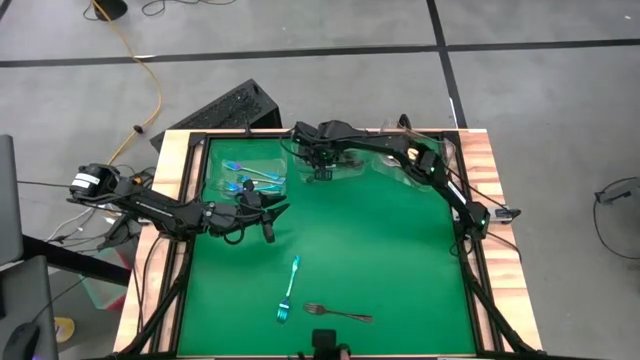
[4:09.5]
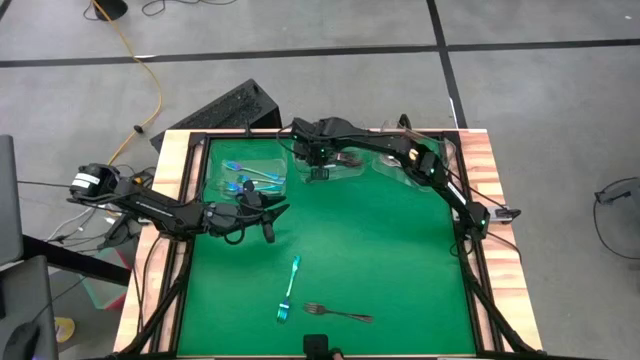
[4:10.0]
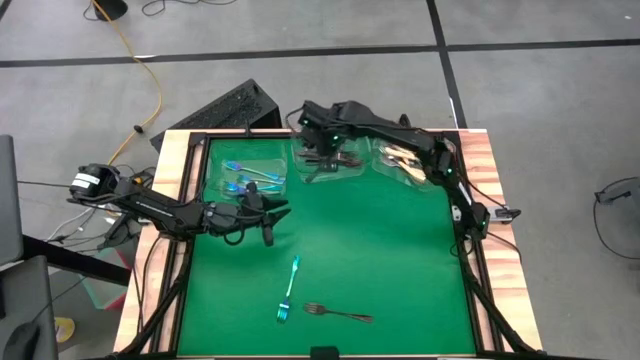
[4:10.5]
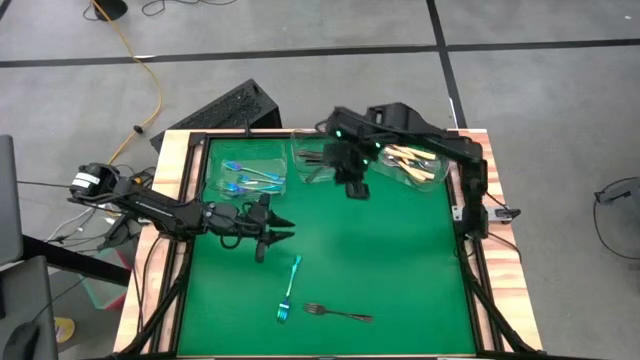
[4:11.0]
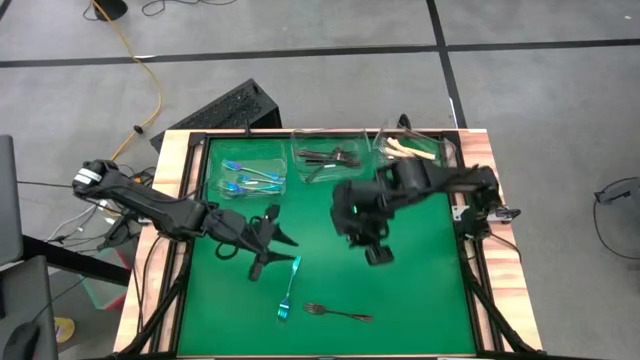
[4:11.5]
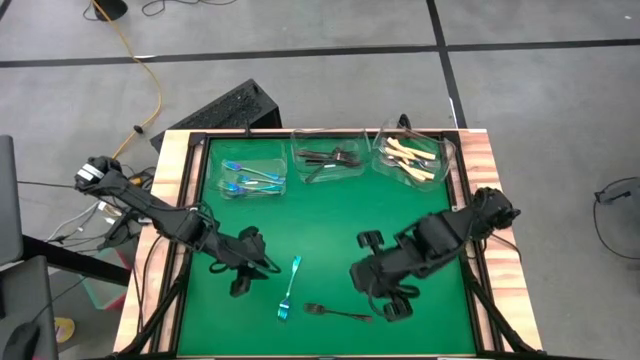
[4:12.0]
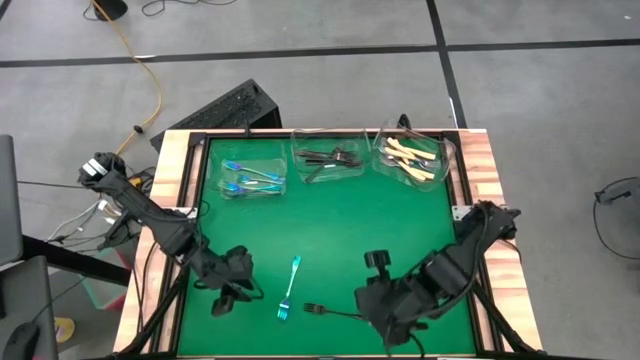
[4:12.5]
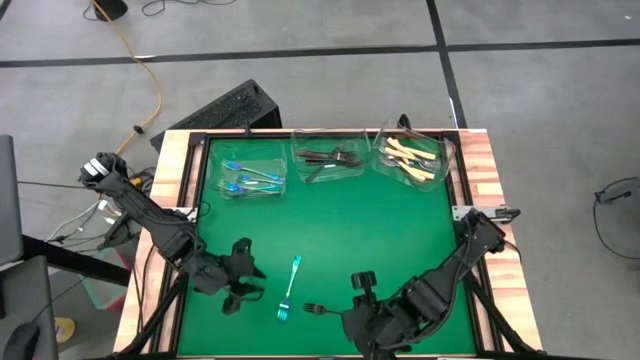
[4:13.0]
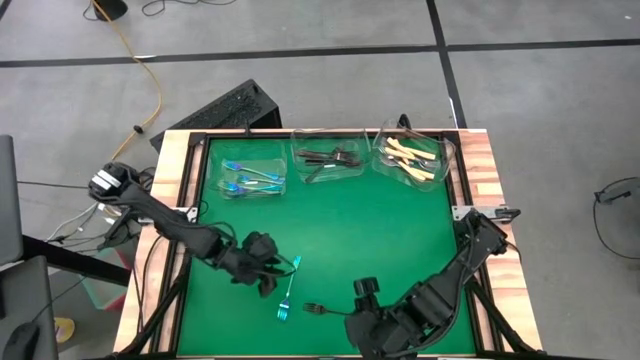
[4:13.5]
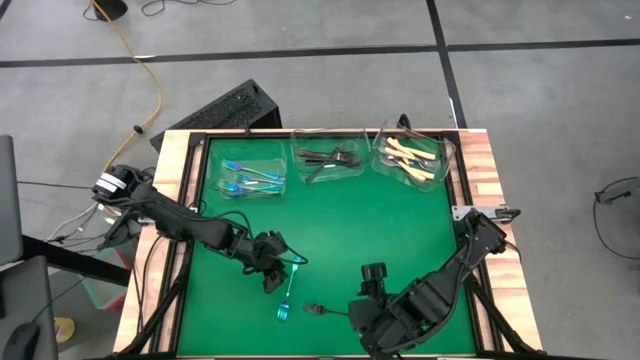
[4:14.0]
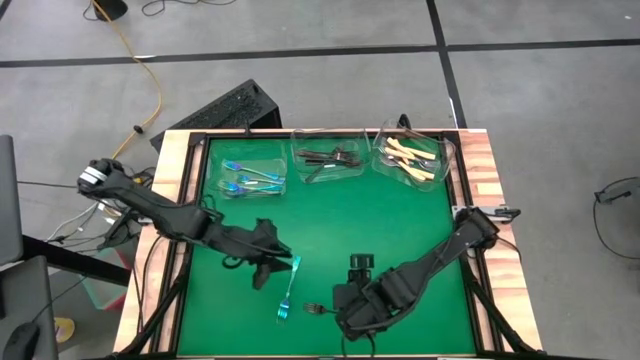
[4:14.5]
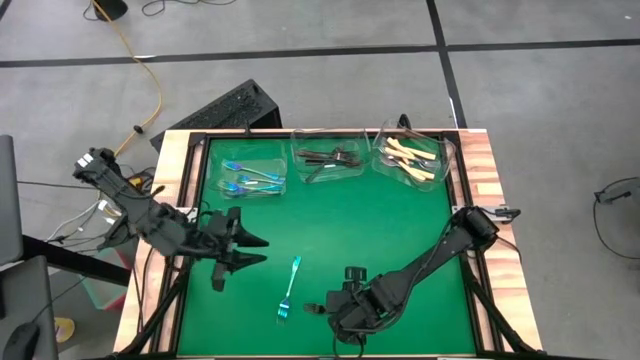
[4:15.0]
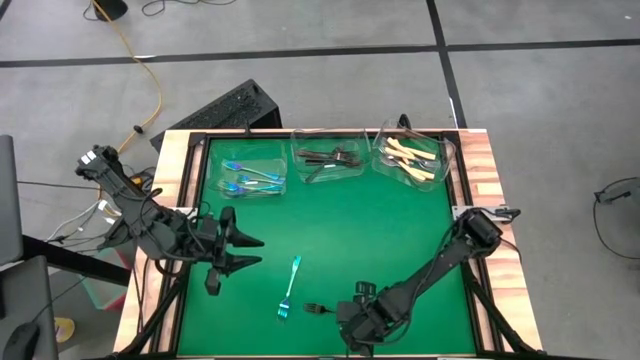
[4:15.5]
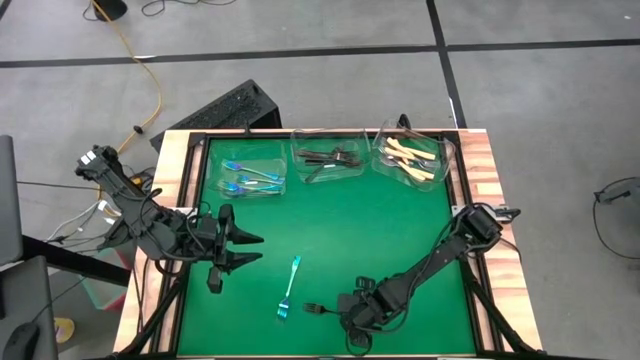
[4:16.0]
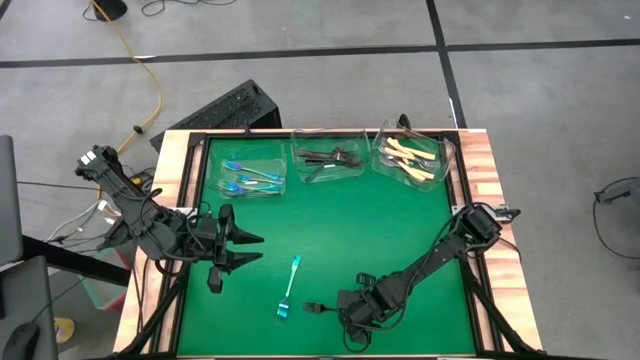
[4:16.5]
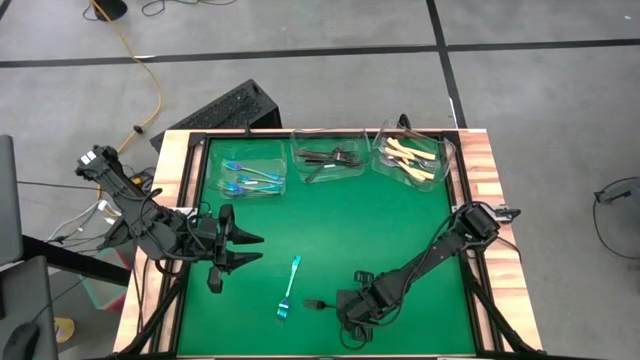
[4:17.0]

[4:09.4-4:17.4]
Task: Sort silverware by color (type)
Put the brown fork into the middle transparent bin

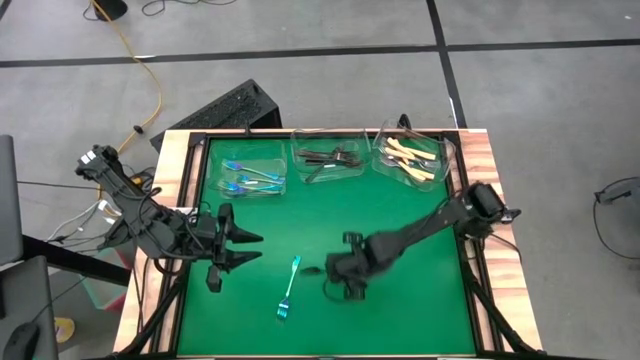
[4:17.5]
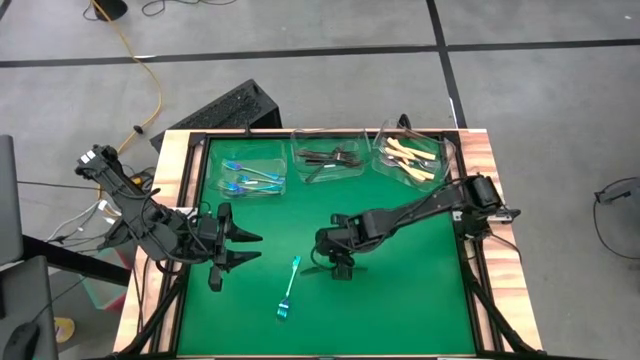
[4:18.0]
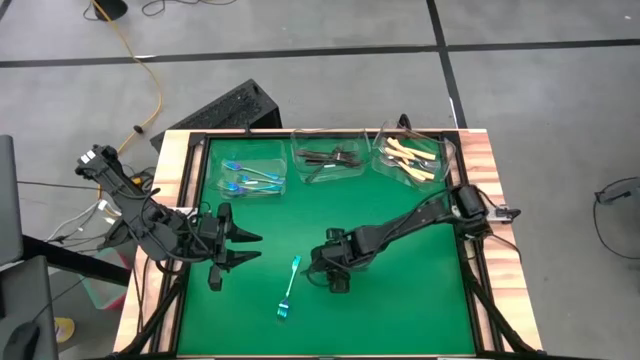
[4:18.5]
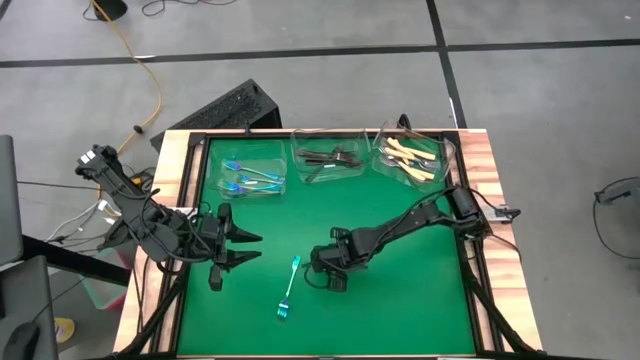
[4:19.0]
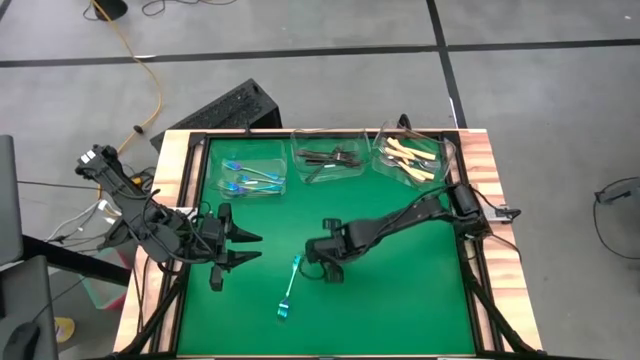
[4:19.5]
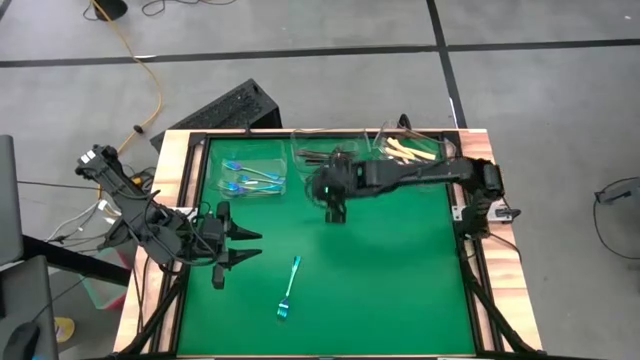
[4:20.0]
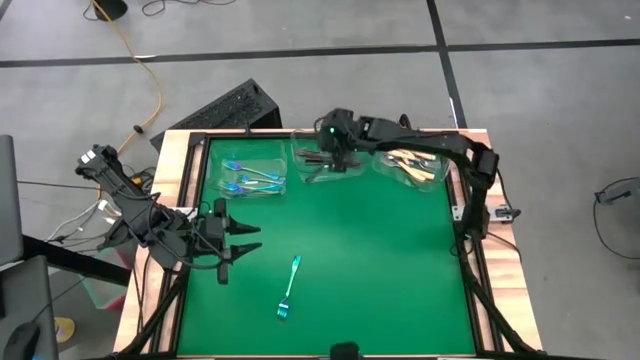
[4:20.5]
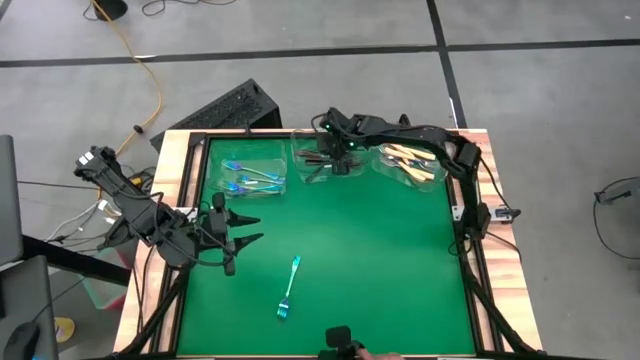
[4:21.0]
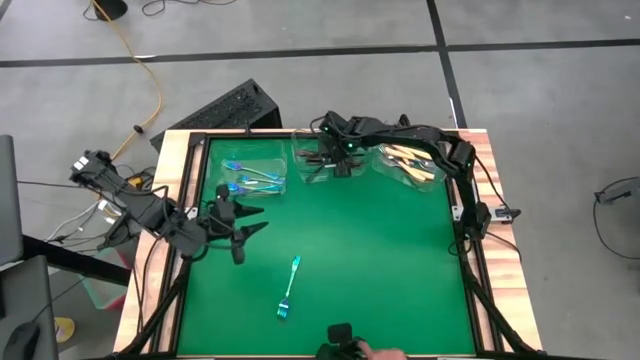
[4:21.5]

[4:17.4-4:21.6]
Put the brown fork into the middle transparent bin

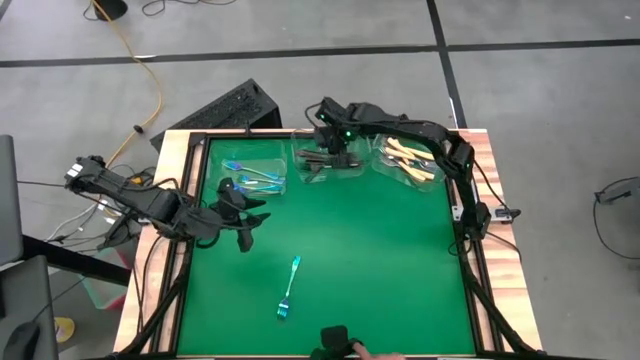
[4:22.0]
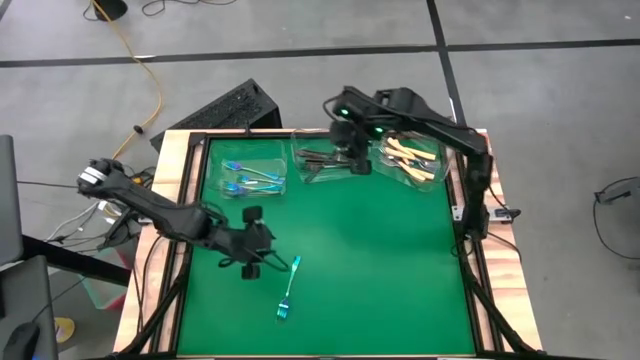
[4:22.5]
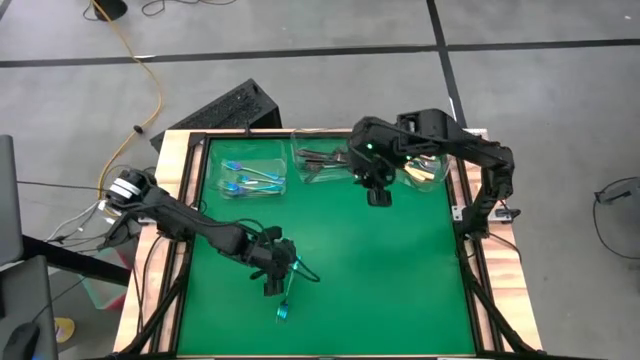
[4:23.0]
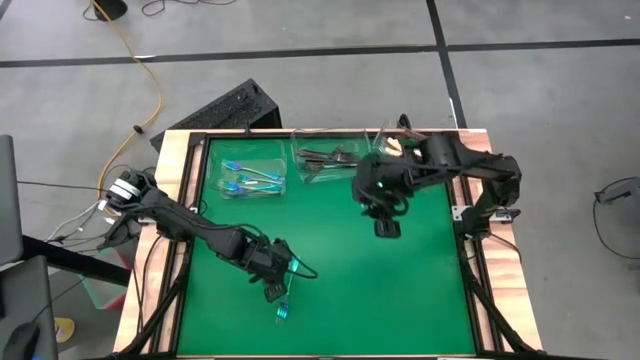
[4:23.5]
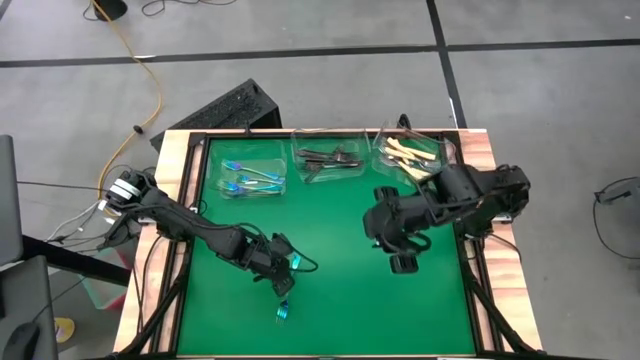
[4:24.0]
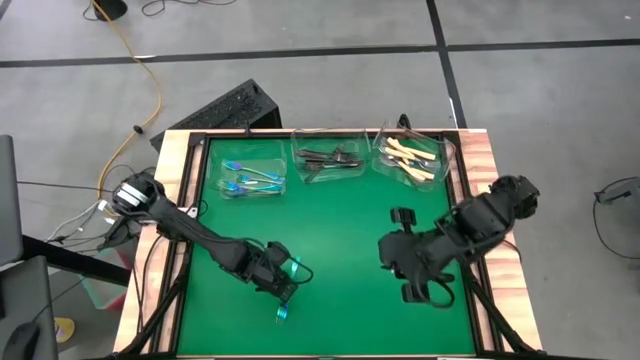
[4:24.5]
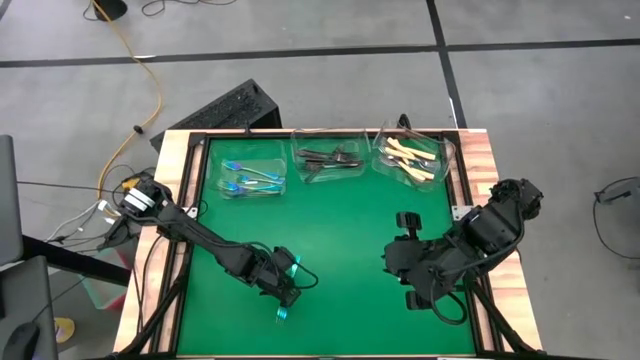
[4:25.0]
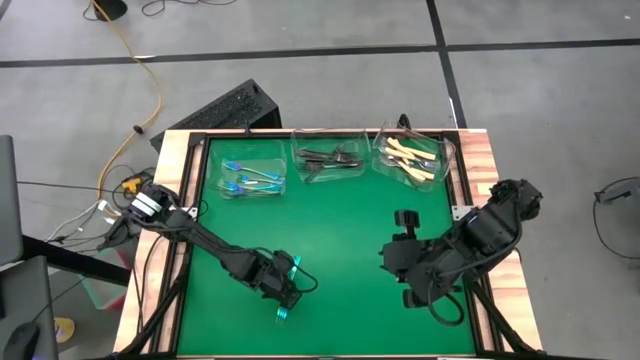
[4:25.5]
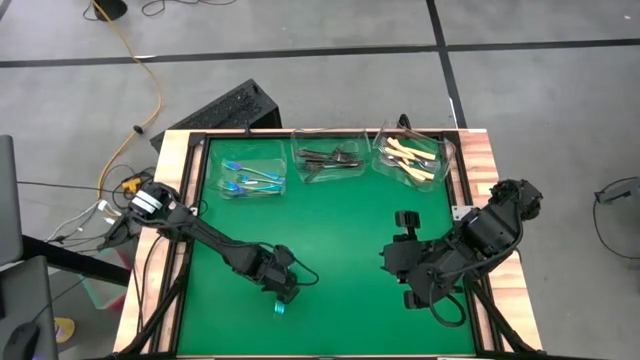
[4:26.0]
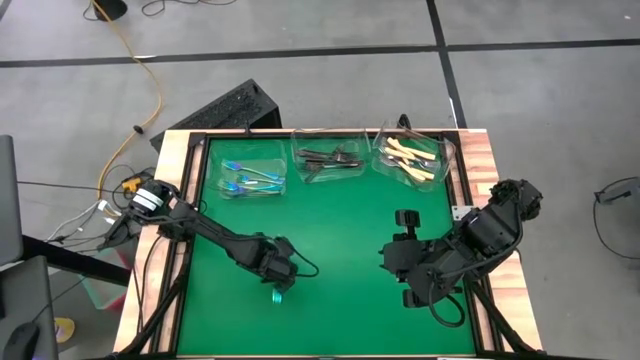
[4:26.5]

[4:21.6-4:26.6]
Put the blue fork into the left transparent bin

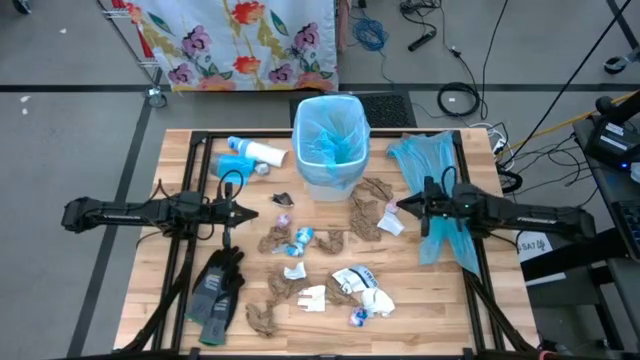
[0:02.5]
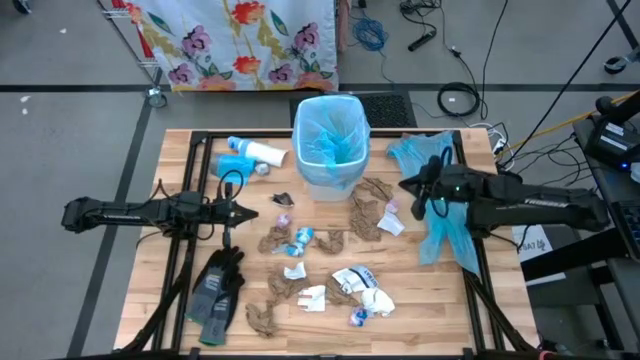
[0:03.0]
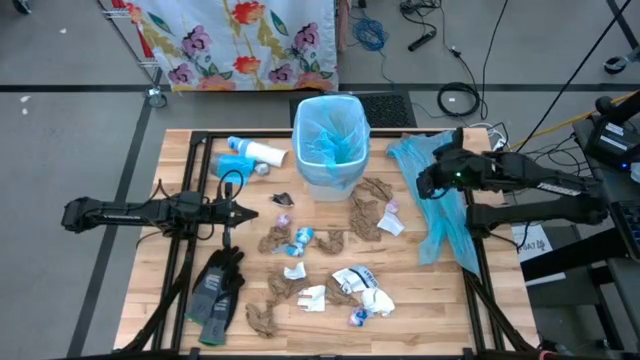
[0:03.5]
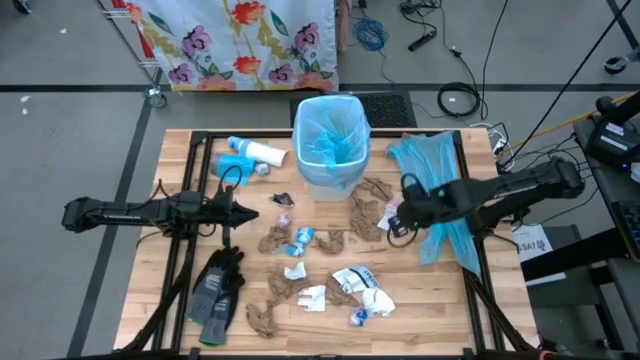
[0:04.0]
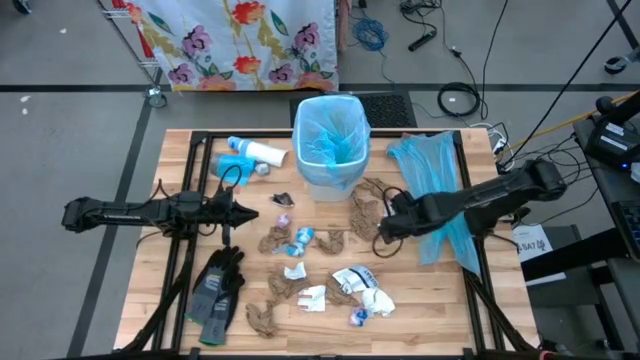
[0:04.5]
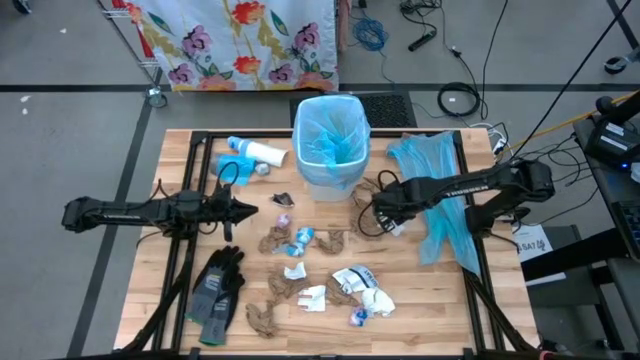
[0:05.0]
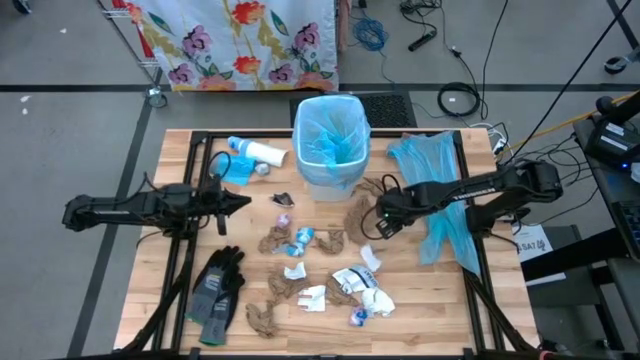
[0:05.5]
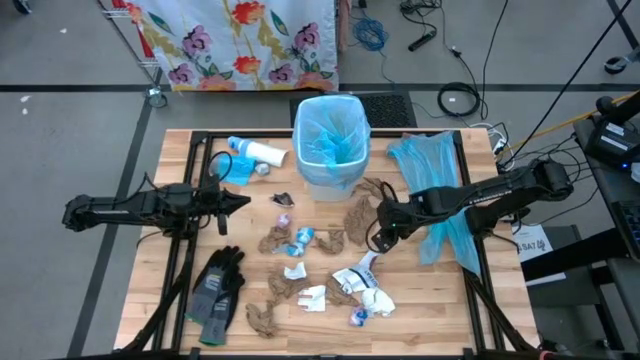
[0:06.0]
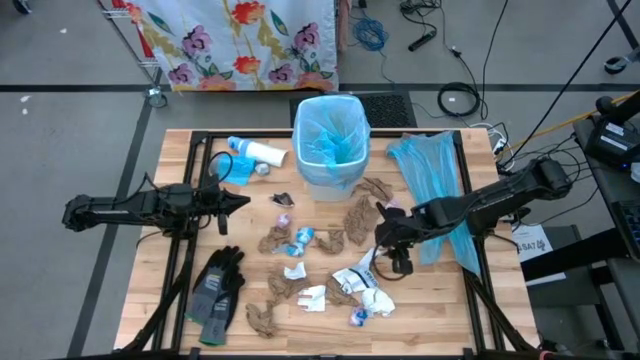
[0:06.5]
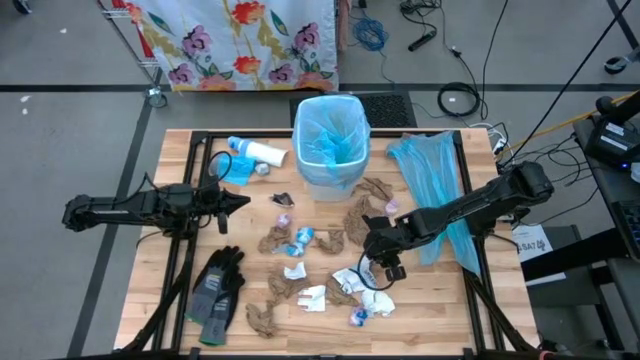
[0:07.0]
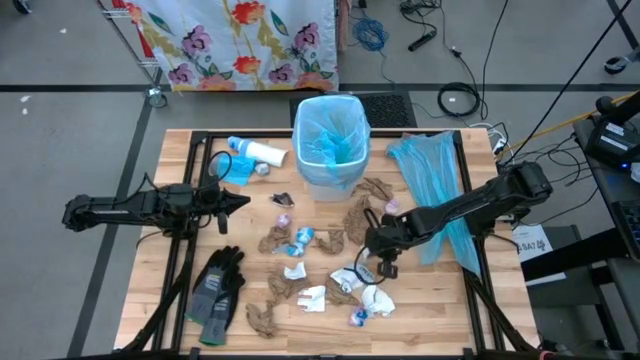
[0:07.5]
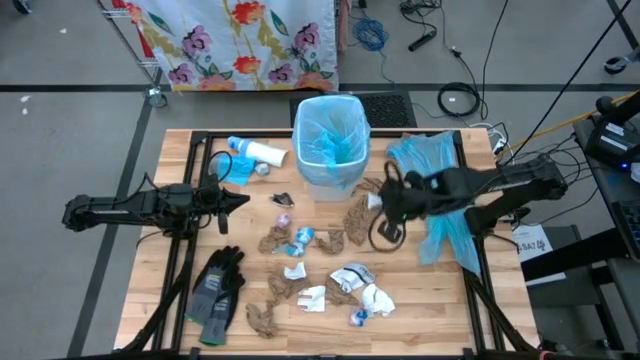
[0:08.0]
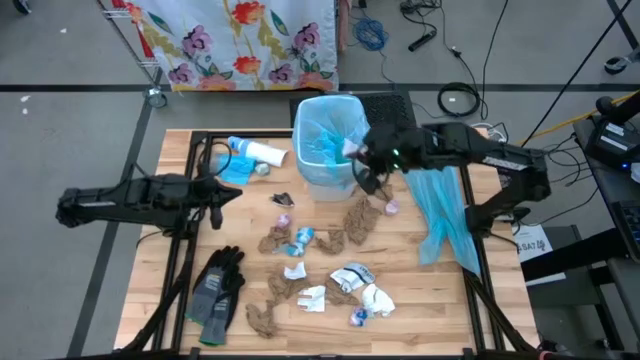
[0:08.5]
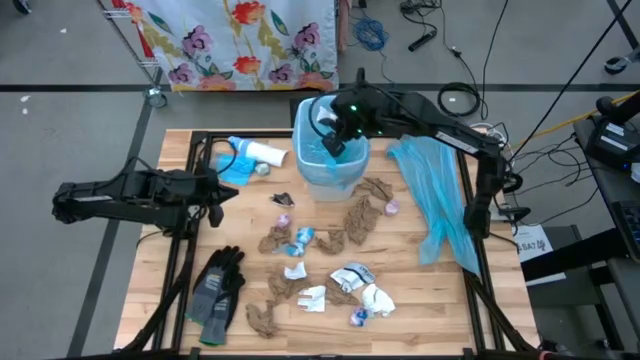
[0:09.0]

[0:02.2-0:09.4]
Task: place trash/remove bag and relplace
Put the white paper into the trash bin
